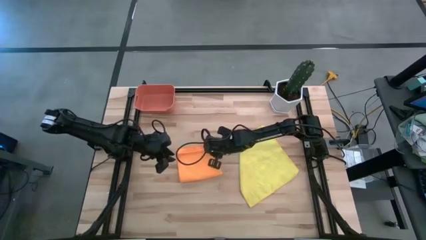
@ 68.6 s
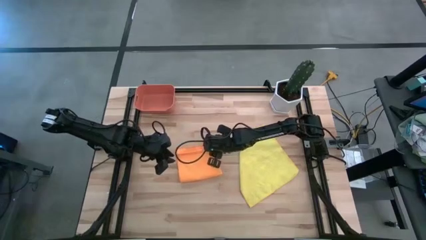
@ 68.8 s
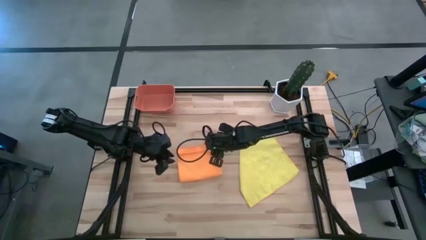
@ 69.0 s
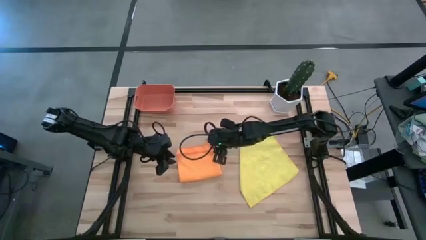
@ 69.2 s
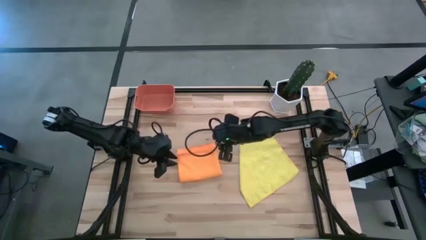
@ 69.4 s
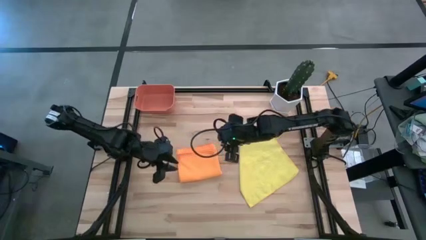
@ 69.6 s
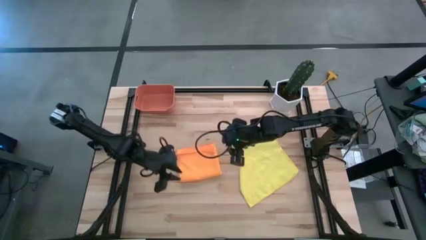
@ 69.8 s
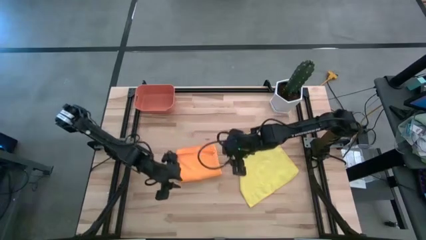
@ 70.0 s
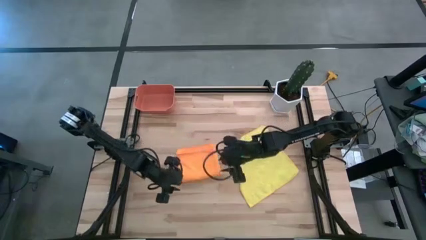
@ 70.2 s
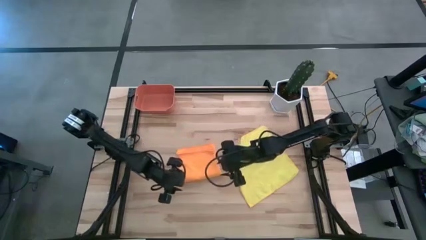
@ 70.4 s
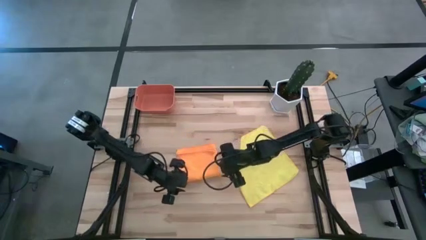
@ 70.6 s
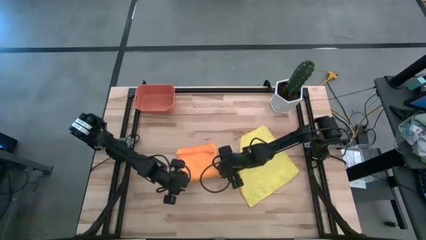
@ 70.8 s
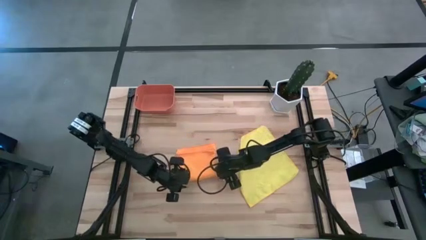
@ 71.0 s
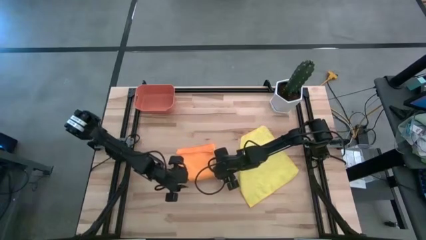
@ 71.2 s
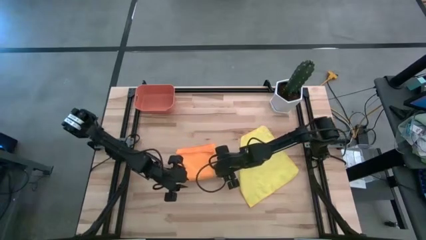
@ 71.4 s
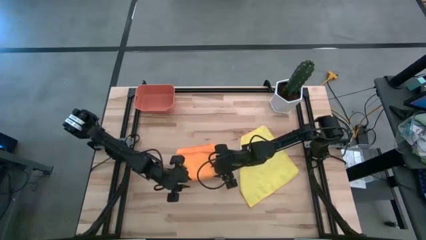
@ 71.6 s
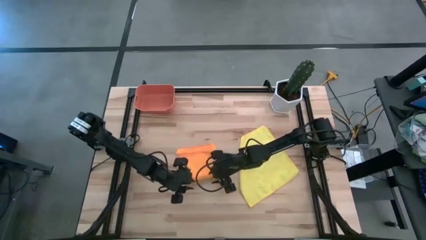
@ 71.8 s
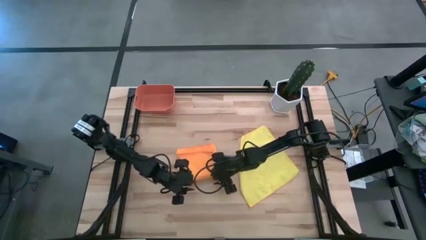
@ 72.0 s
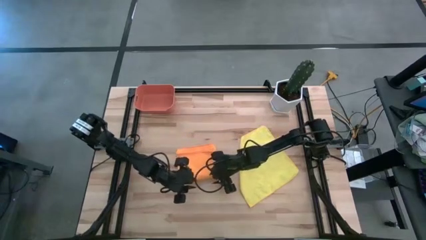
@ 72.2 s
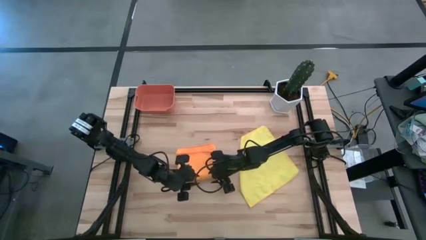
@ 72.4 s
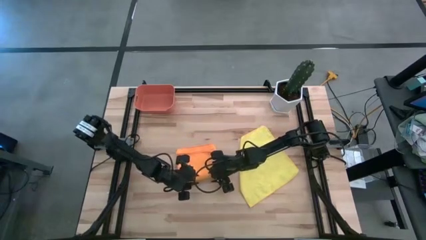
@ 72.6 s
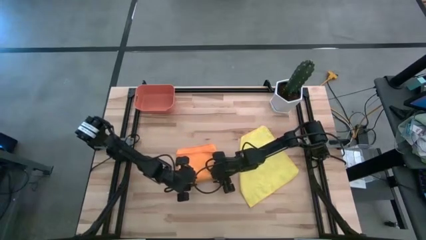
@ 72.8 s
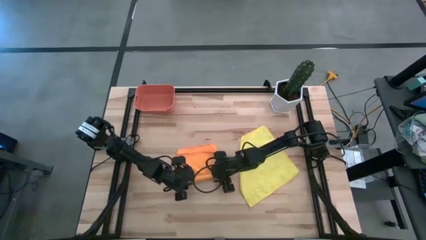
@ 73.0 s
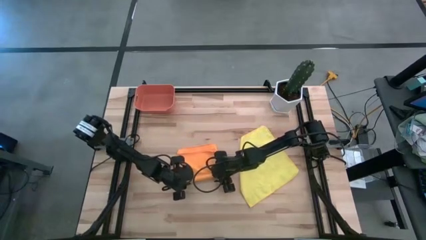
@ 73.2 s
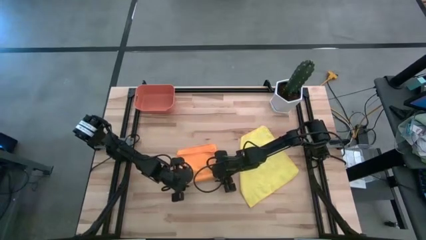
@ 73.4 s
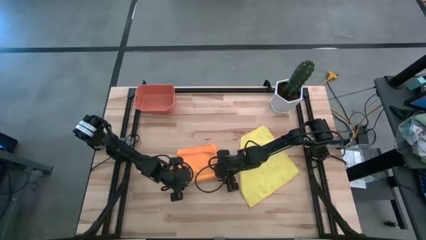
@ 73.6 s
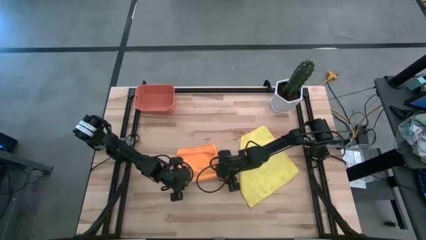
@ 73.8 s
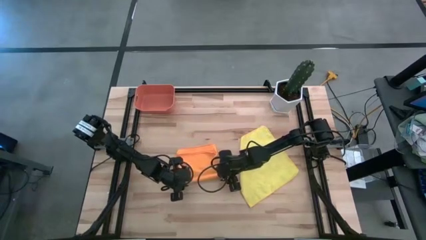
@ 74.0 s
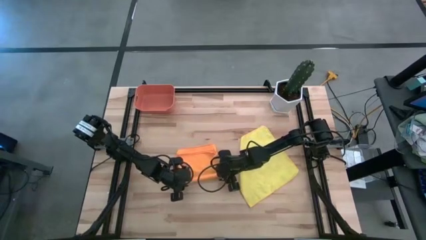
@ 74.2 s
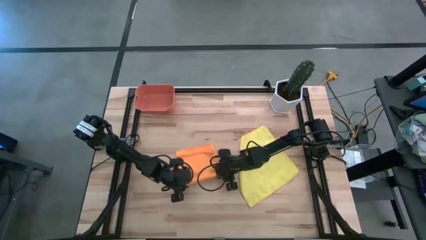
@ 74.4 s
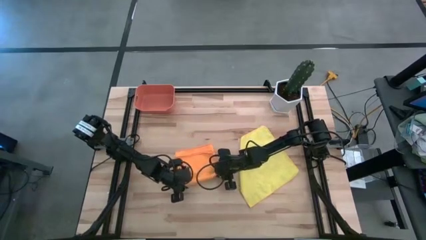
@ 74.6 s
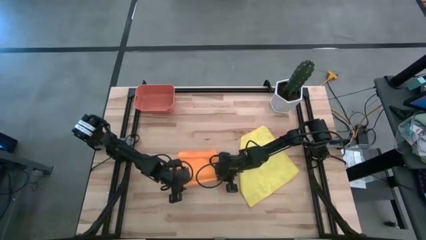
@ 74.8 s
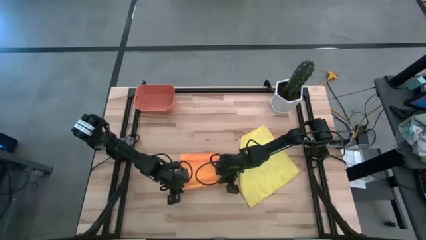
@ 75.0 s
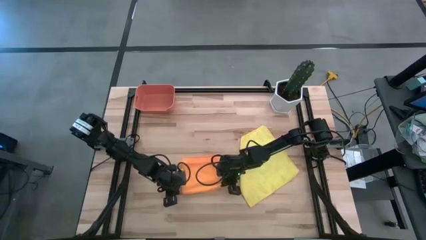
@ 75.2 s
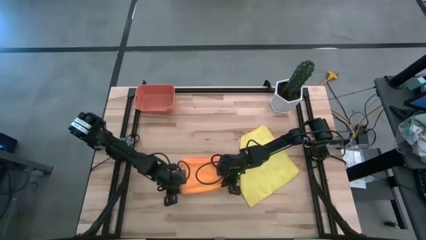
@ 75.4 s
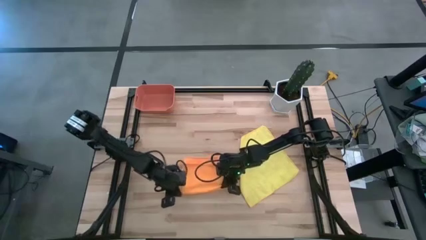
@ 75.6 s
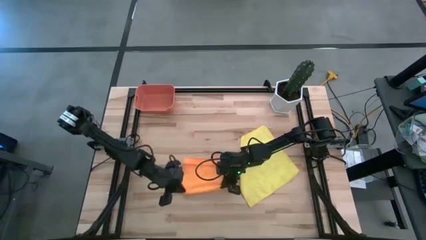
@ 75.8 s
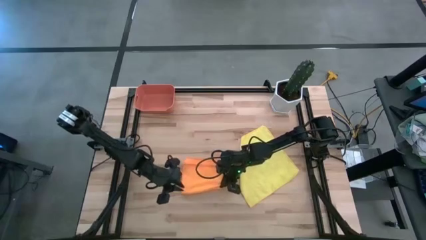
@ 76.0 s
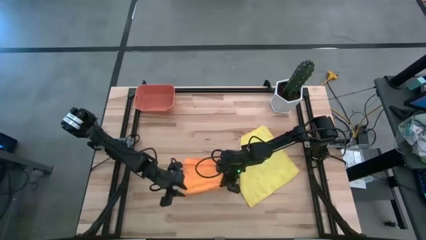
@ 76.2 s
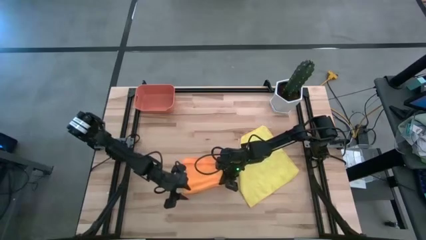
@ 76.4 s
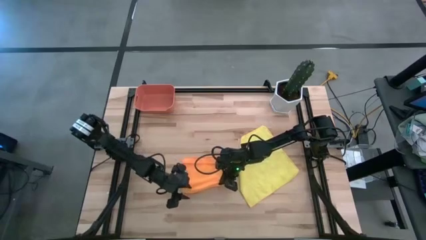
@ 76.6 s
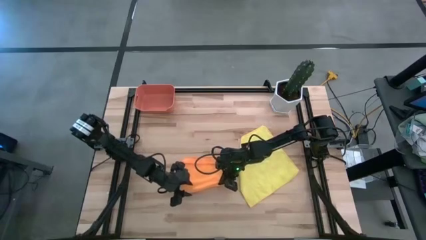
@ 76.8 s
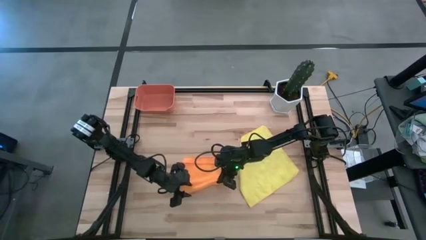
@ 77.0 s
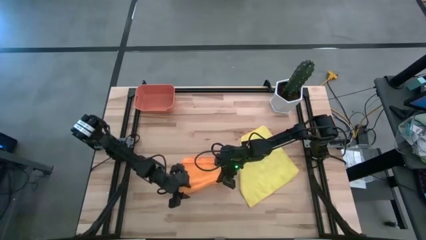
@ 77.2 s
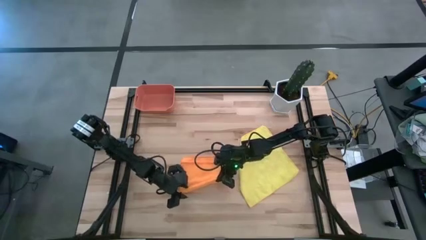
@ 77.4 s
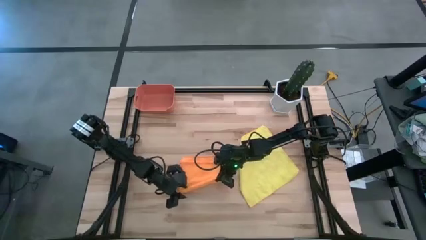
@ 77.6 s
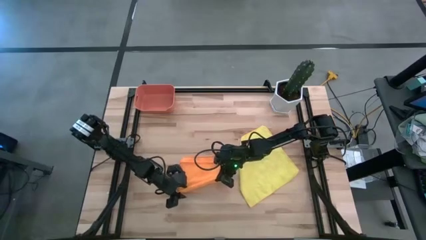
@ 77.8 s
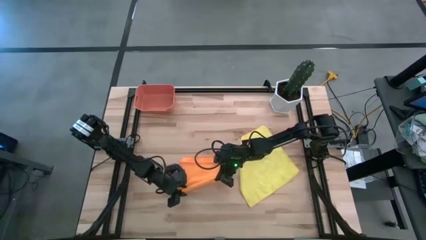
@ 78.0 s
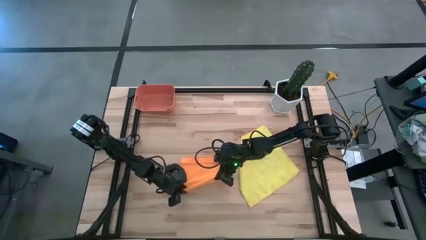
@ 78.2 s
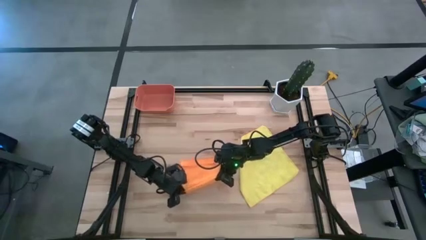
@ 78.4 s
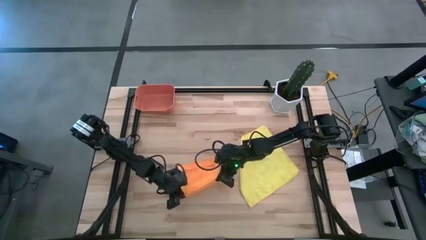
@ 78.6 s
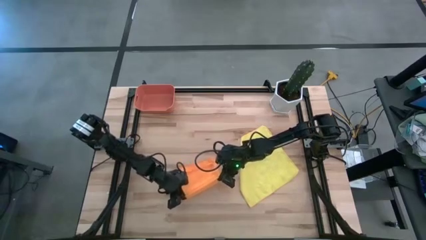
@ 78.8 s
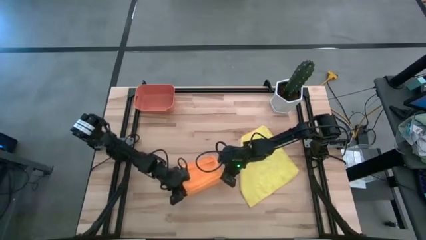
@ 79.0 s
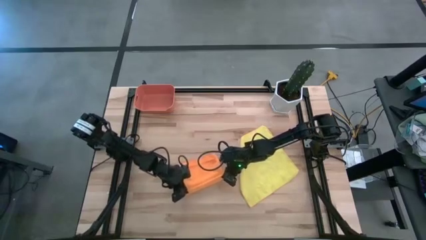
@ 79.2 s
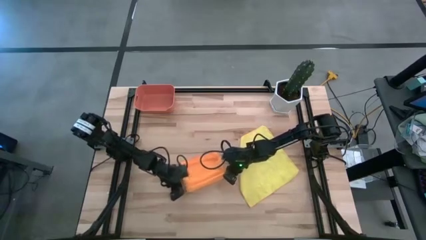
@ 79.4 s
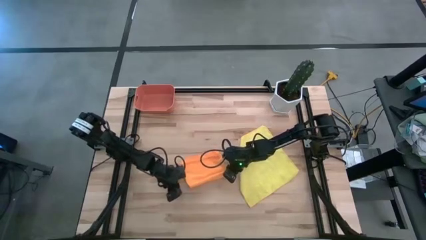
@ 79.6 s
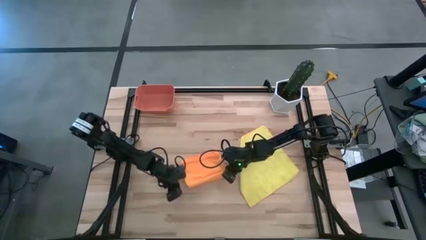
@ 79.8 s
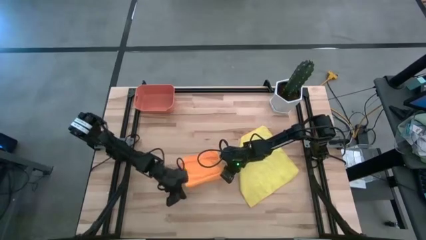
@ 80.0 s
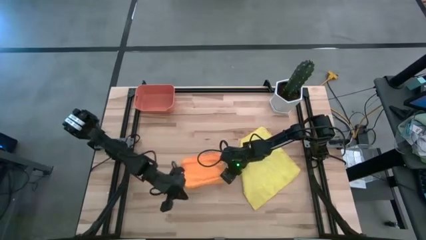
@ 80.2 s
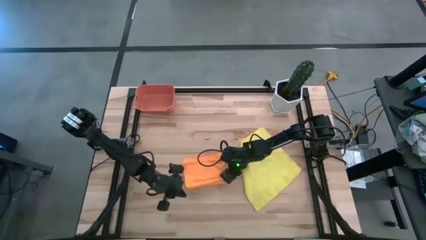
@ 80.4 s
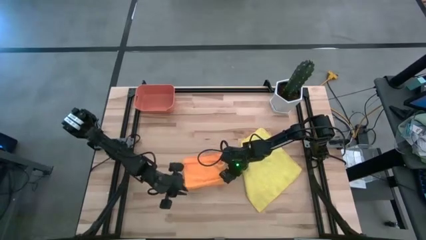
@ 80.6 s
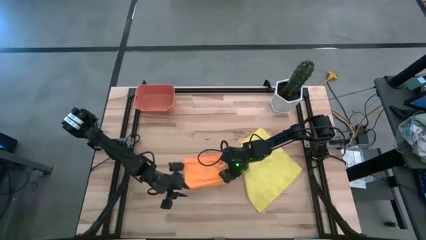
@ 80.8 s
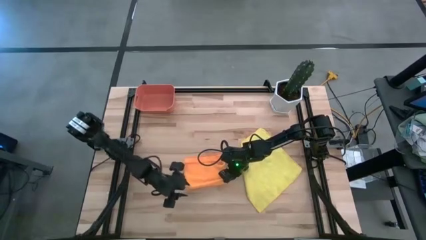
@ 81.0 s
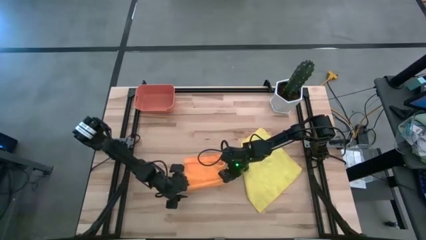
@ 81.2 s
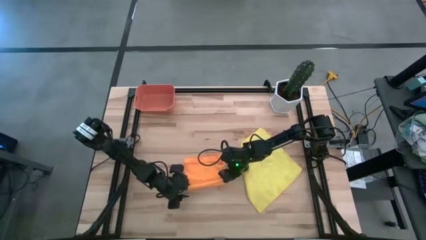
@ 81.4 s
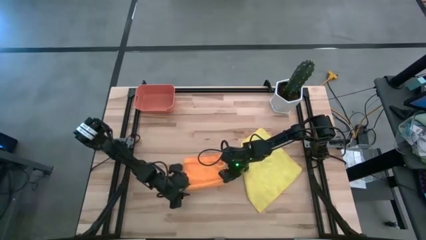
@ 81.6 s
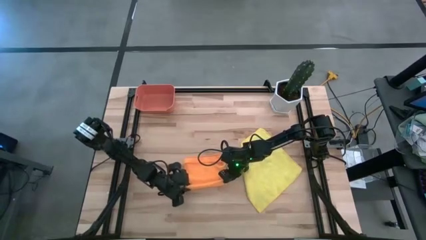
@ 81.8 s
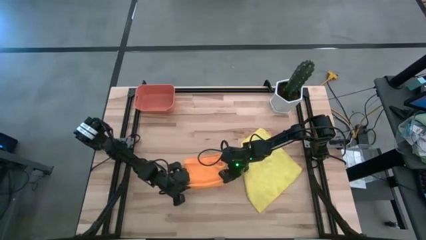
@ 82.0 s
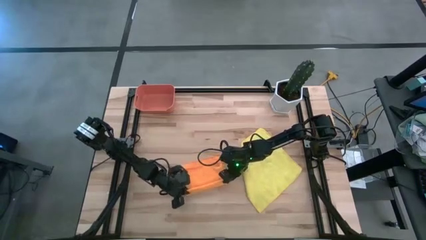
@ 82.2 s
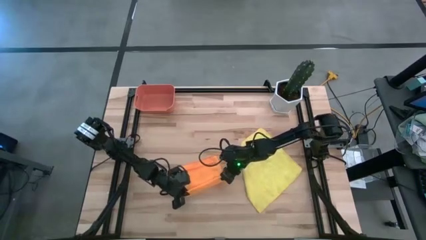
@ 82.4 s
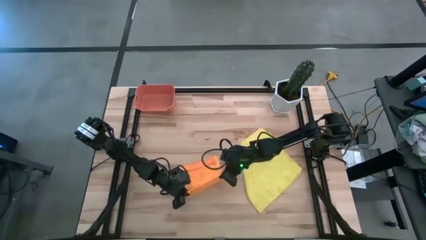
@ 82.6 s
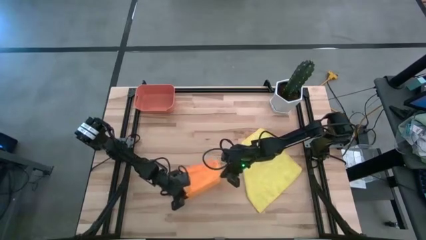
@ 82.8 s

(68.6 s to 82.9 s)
Task: Roll microfiber towels into tight, uniform cylinder then place into a basket
Roll the orange towel
